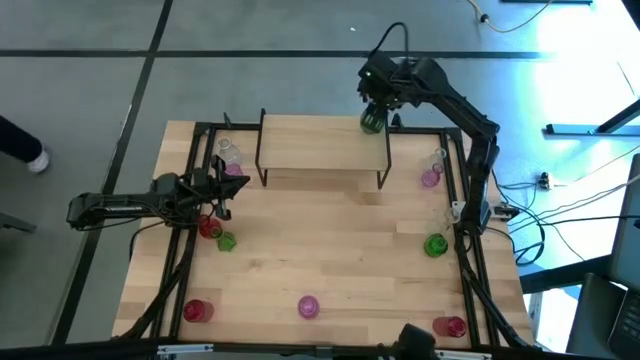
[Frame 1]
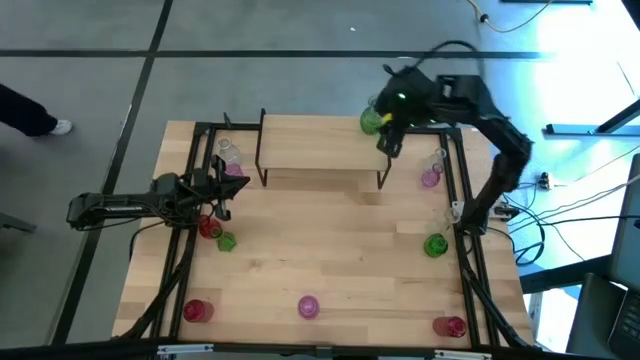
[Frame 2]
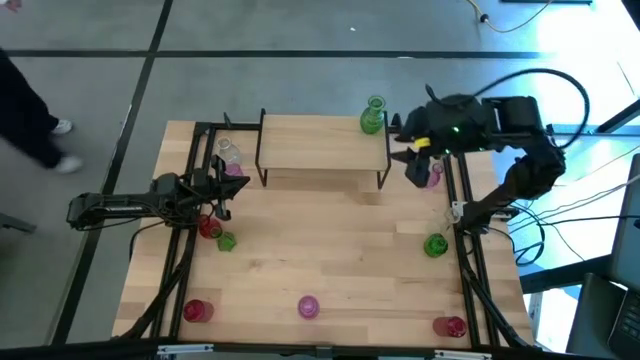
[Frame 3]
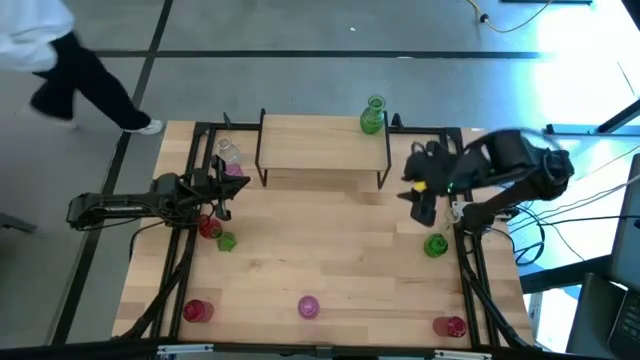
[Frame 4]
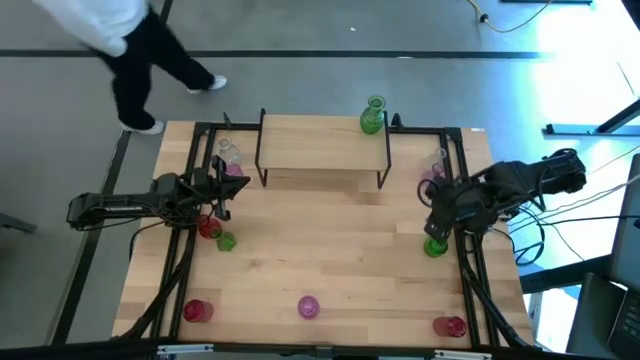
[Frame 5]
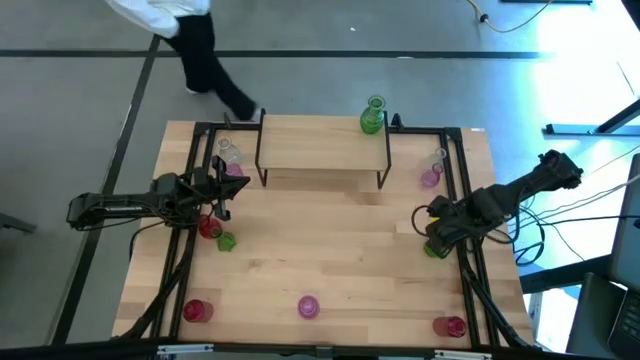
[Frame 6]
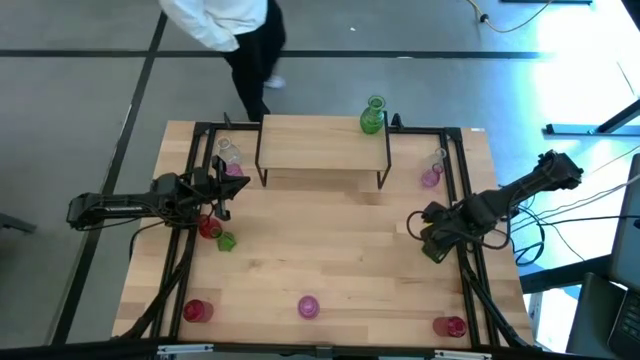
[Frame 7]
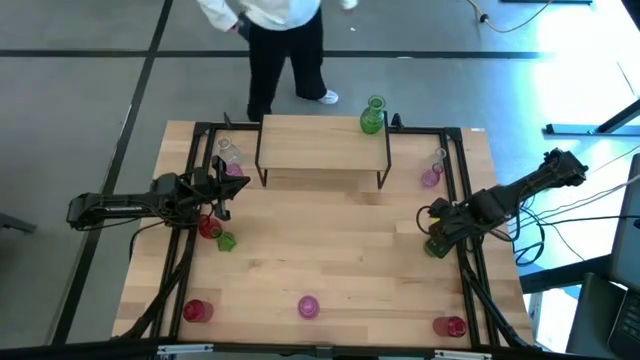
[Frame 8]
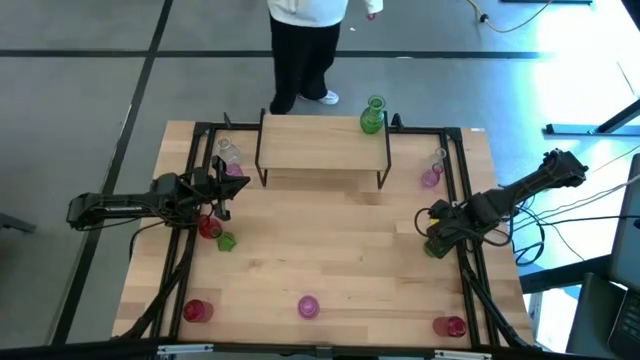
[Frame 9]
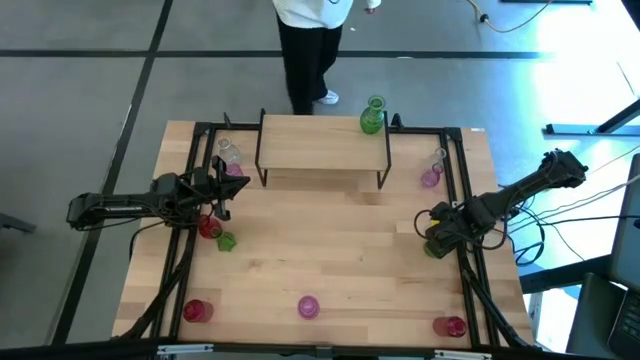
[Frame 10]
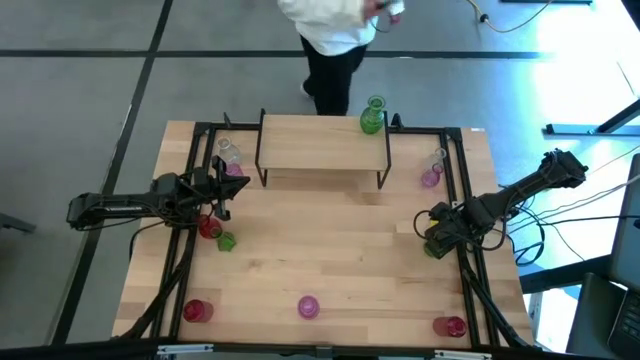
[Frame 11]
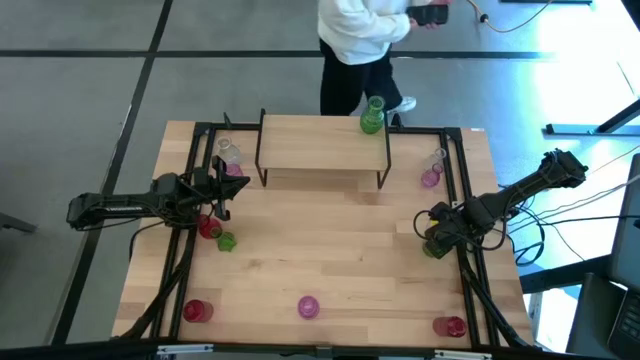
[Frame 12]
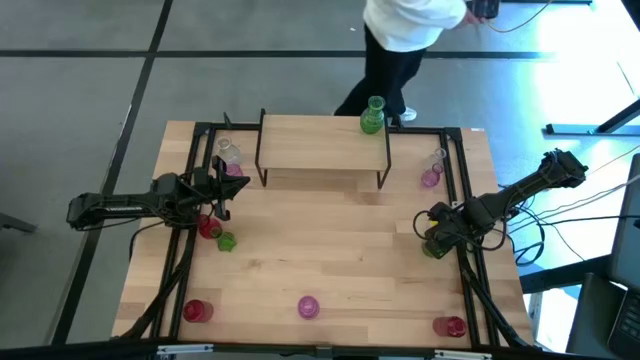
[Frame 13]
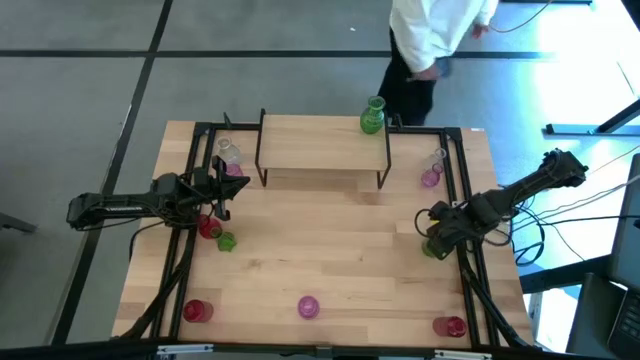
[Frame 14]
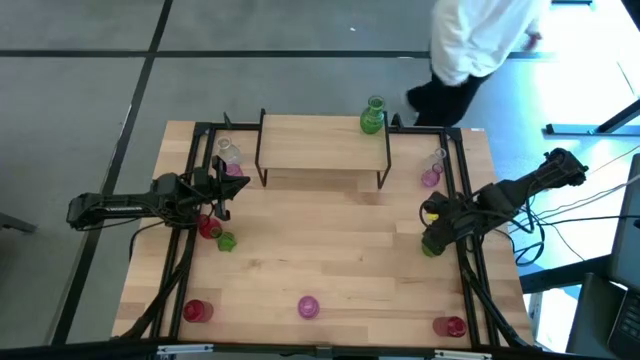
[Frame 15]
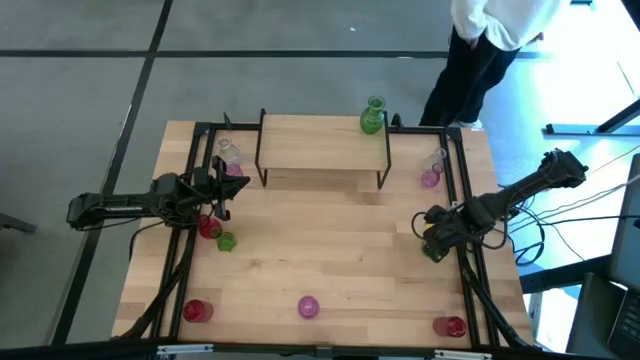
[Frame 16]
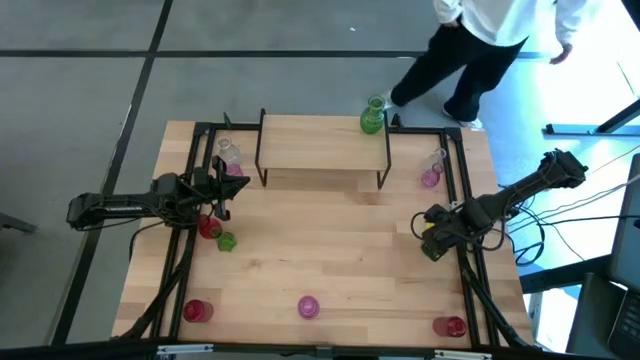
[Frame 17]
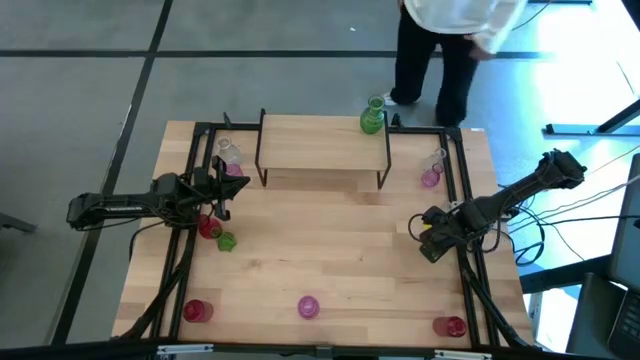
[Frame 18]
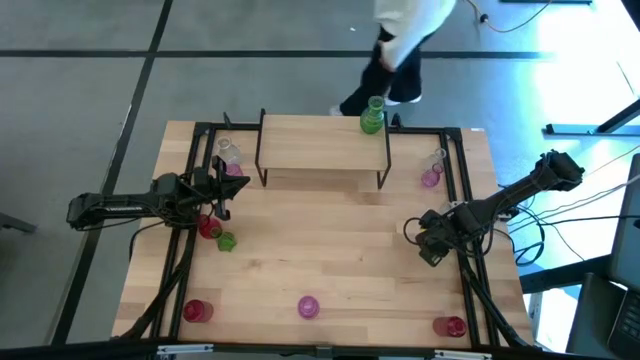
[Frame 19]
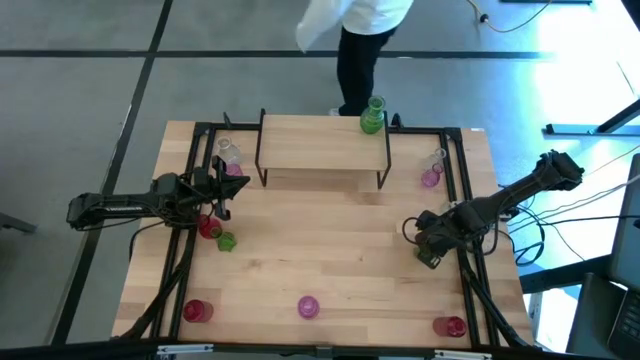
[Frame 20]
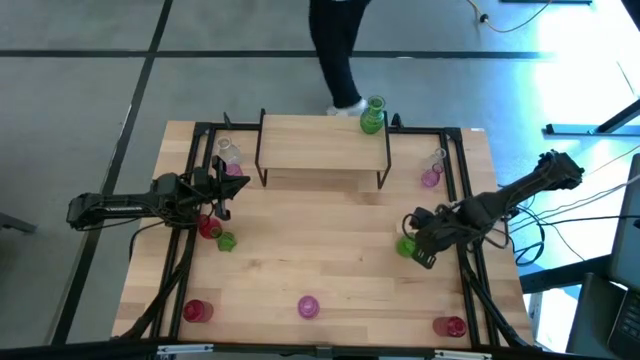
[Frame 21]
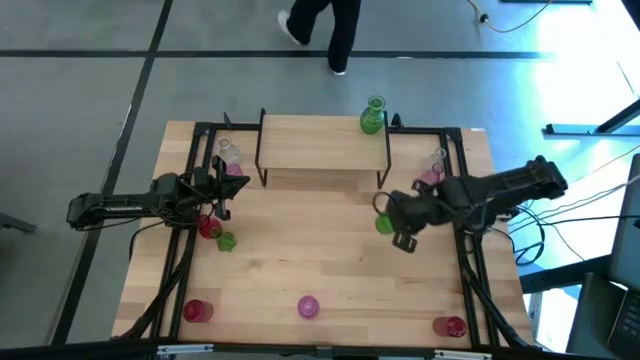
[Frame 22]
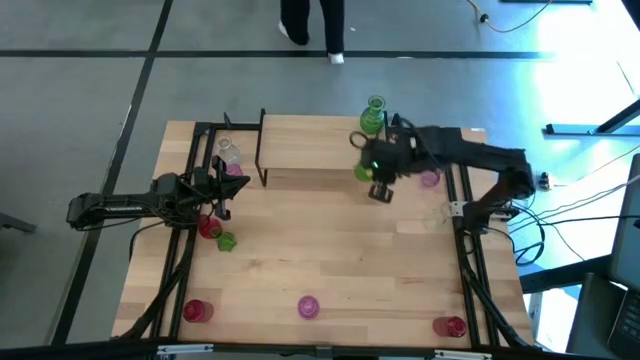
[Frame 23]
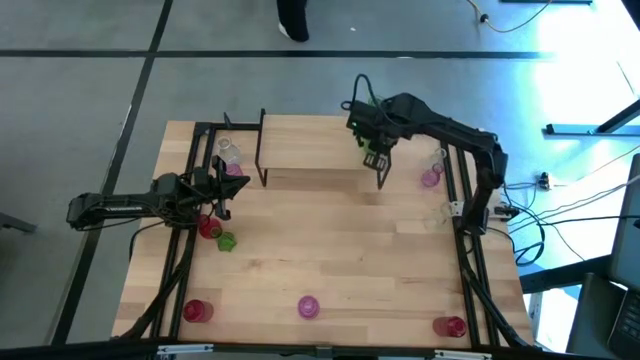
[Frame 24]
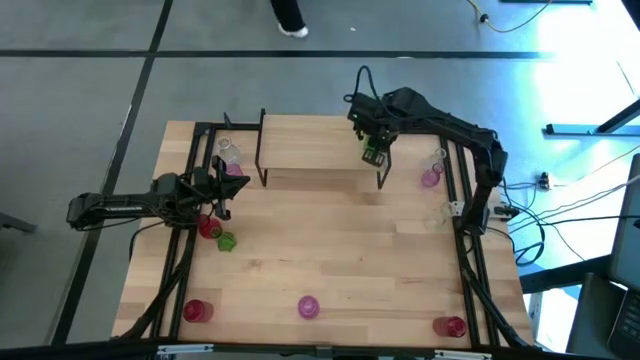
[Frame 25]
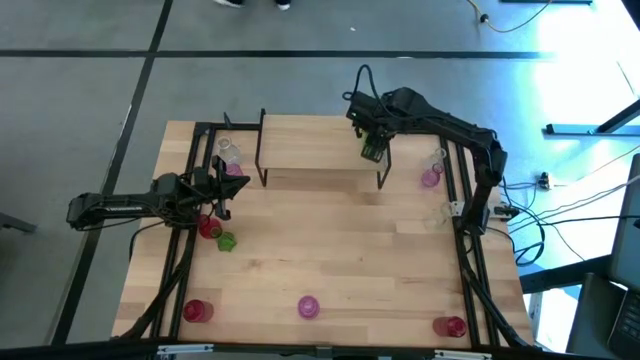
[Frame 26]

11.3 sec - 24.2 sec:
Task: sort vases onto shelf
Put the right green vase on the shelf aligned with the other green vase
